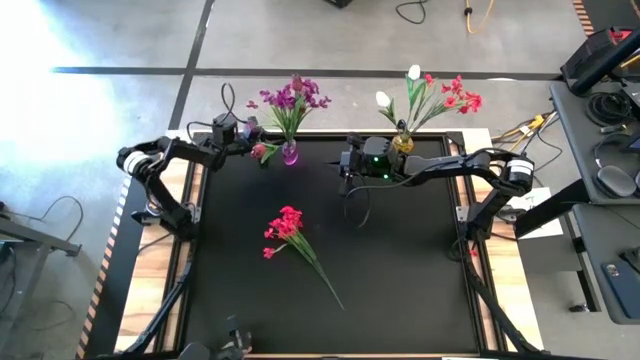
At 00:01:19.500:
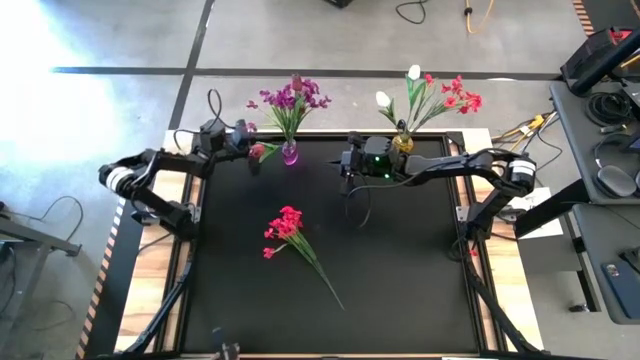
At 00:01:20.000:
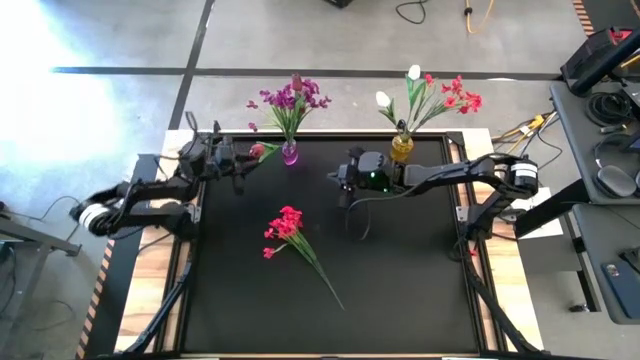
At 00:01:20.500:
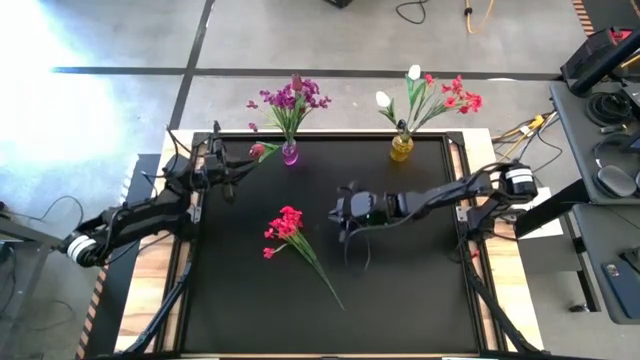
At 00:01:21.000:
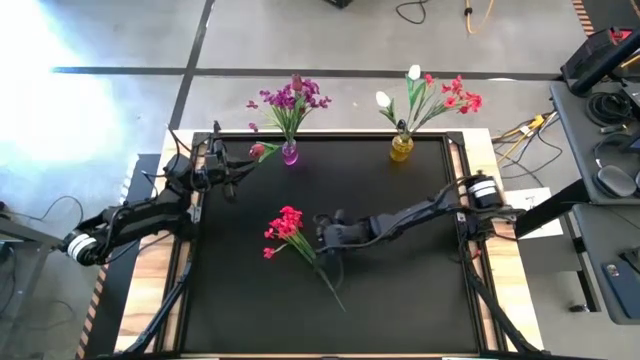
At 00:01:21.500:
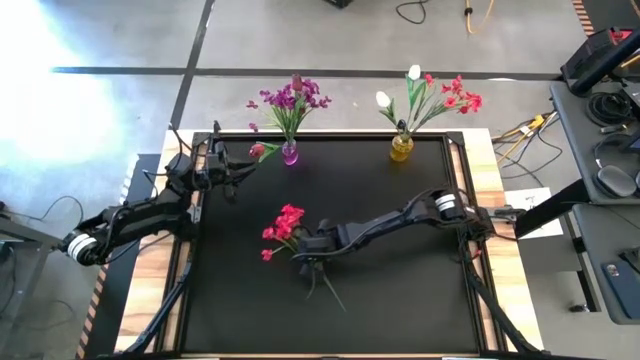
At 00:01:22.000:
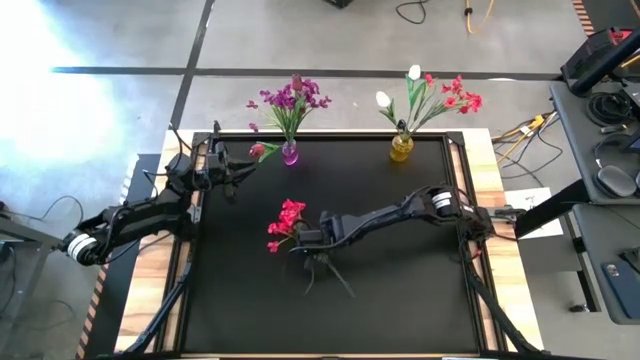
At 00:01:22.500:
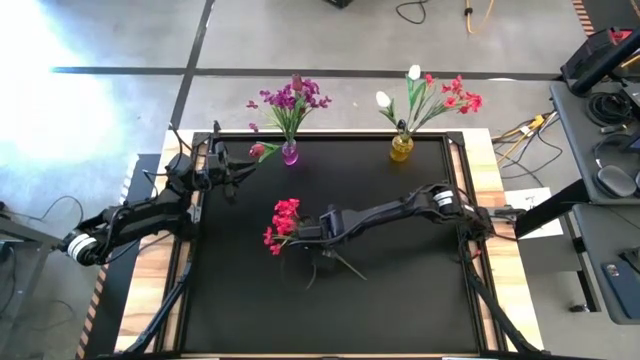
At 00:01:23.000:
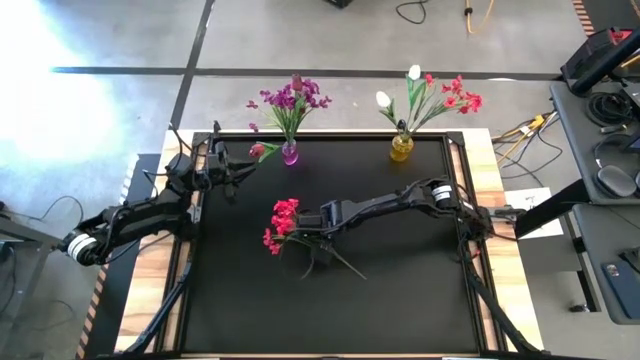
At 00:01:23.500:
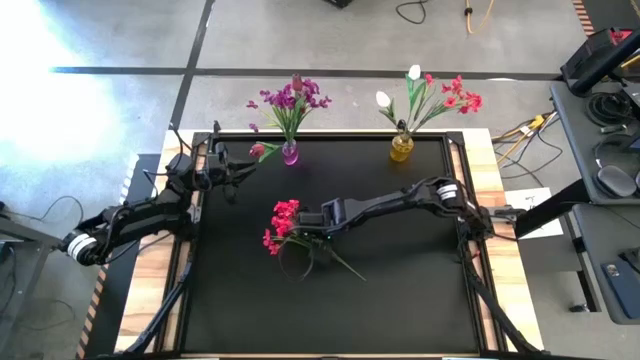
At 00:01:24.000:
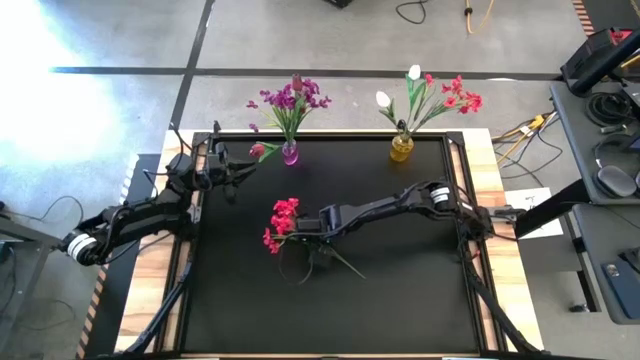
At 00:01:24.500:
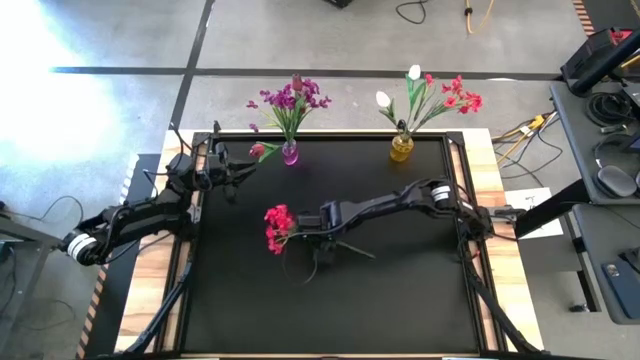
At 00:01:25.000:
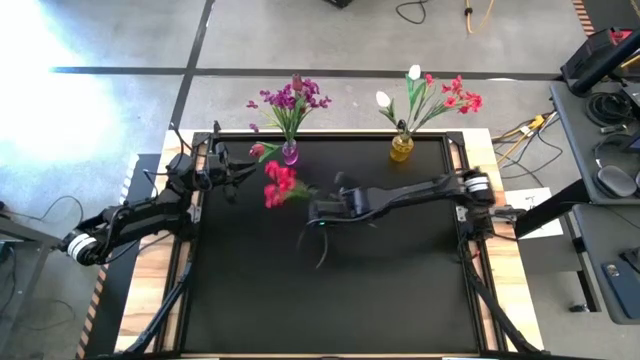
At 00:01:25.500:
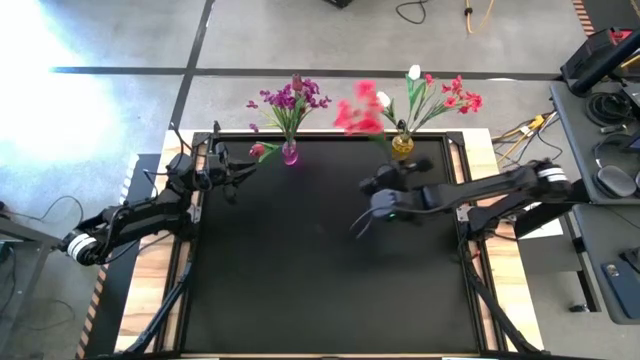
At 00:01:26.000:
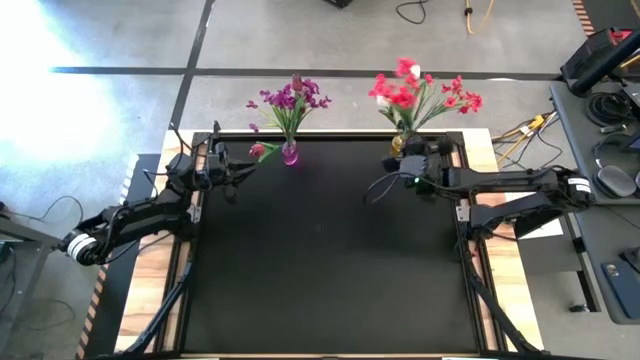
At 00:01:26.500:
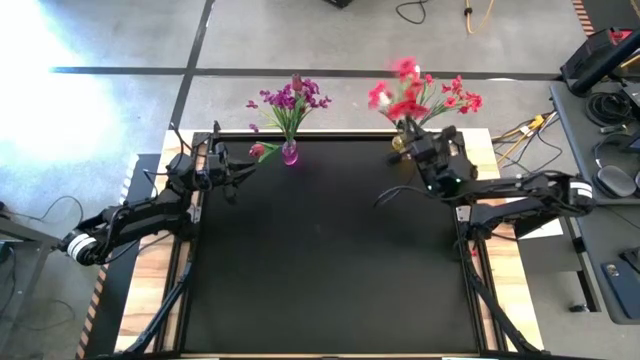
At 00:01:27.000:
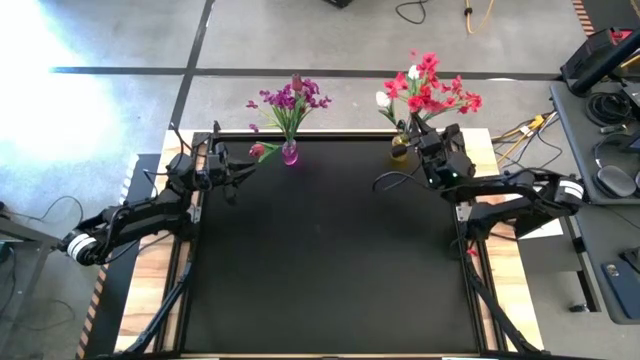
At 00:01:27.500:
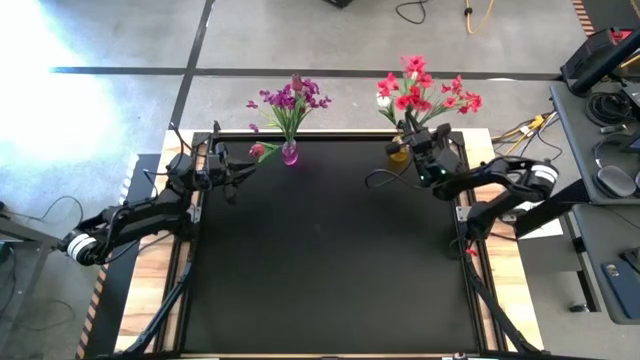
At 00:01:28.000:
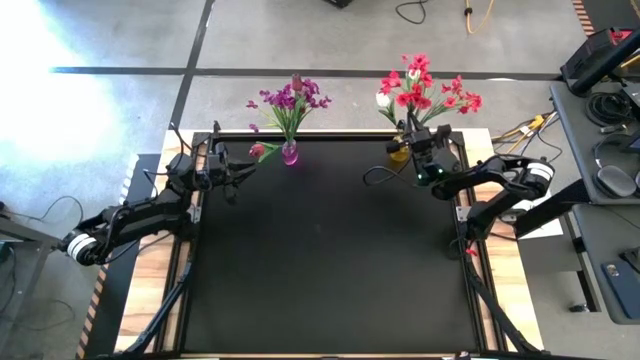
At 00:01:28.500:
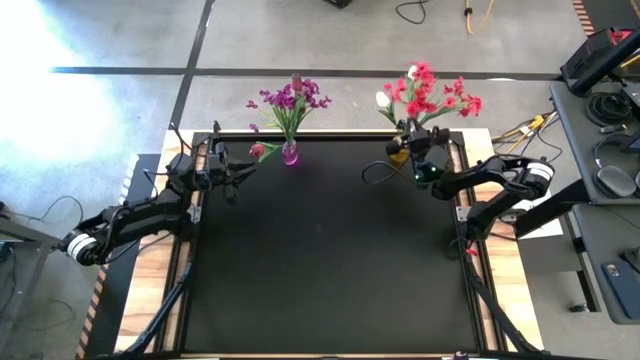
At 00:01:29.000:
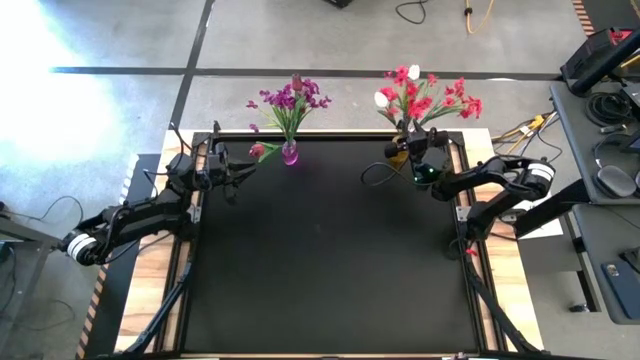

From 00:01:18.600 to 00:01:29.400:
Task: Sort flowers into vase by color
Put the bouquet of red flowers into the yellow vase

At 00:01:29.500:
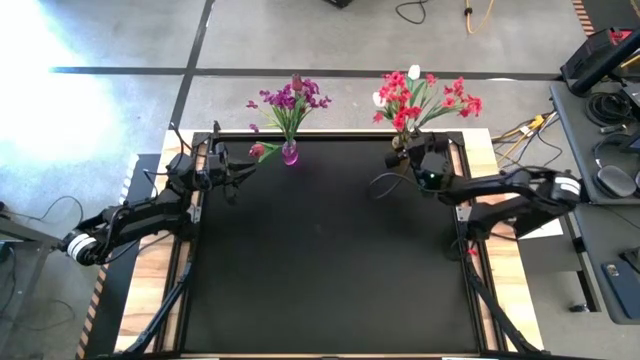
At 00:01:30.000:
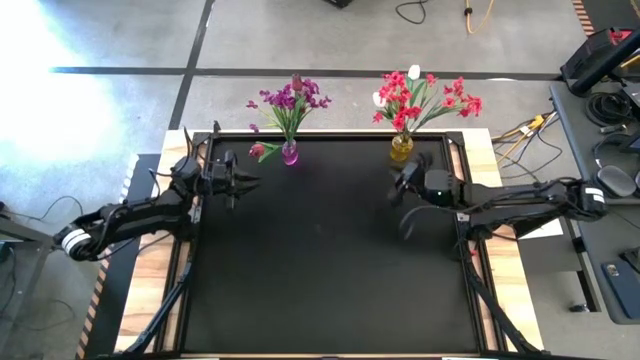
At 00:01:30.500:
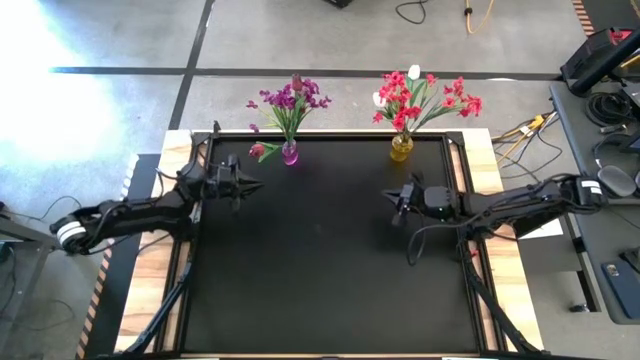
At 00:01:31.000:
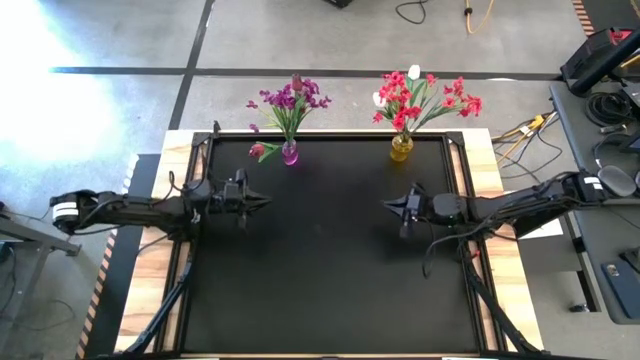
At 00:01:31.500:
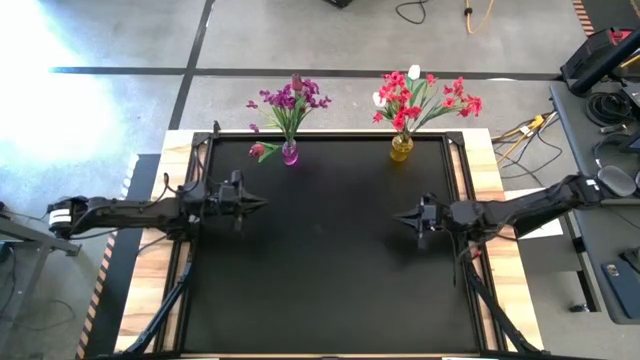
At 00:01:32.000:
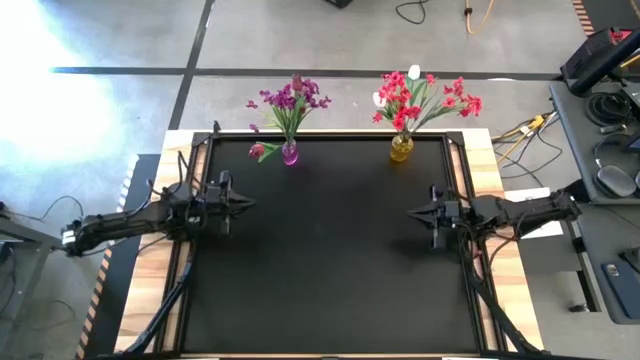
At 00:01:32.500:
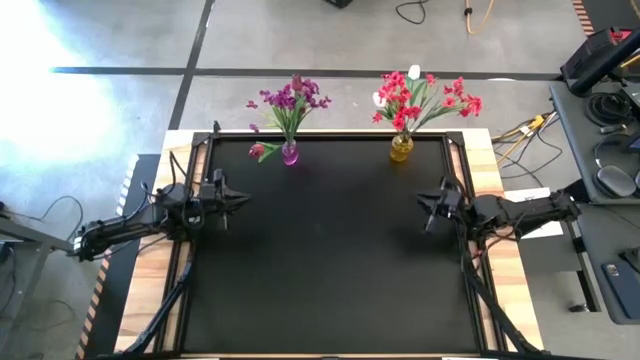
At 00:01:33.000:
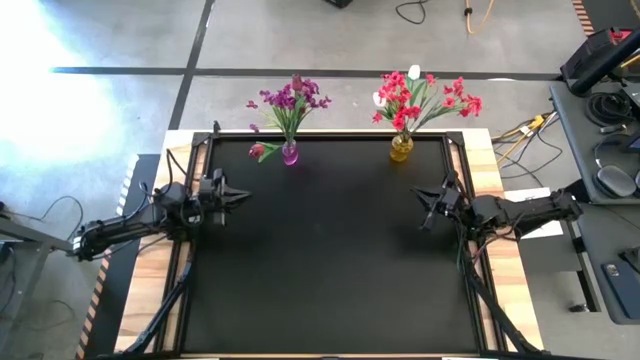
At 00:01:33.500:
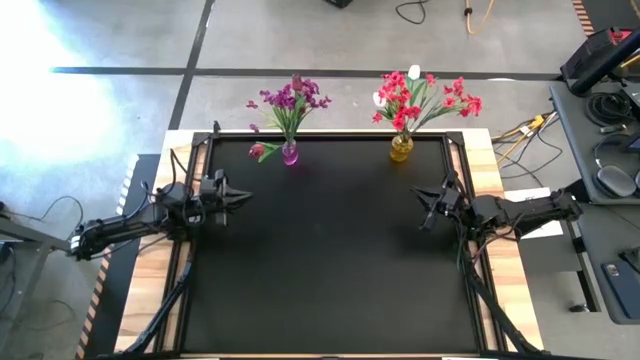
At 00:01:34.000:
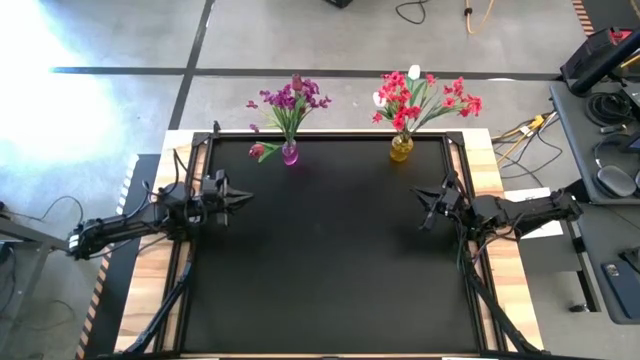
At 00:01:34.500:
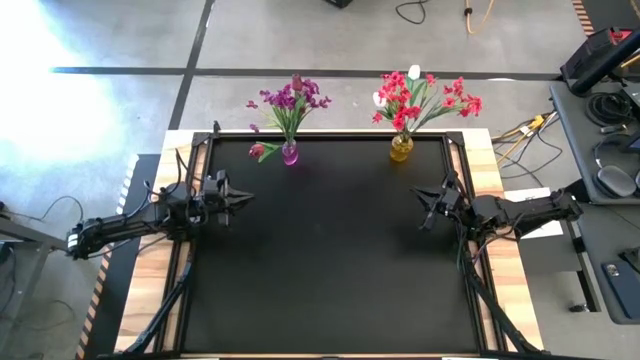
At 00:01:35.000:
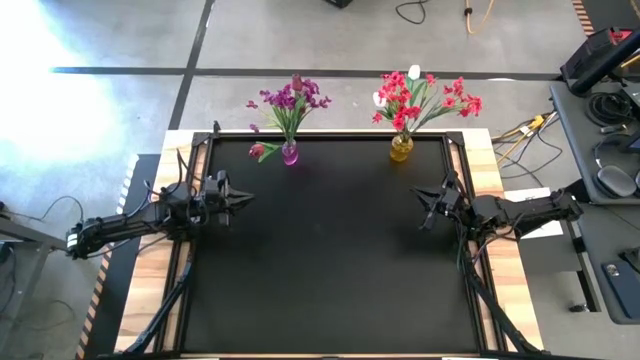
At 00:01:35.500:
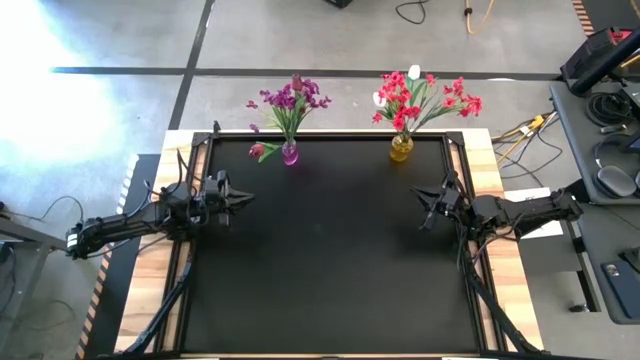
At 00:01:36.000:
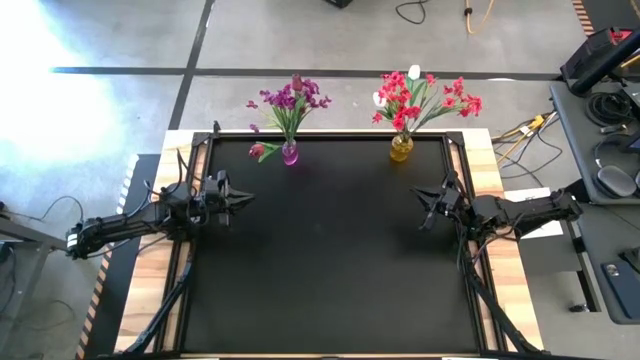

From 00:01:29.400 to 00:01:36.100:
Return to Home Position

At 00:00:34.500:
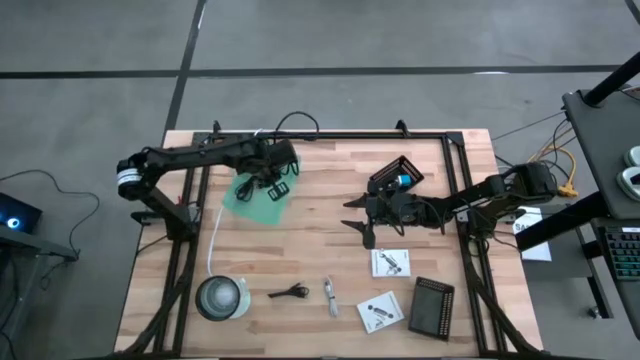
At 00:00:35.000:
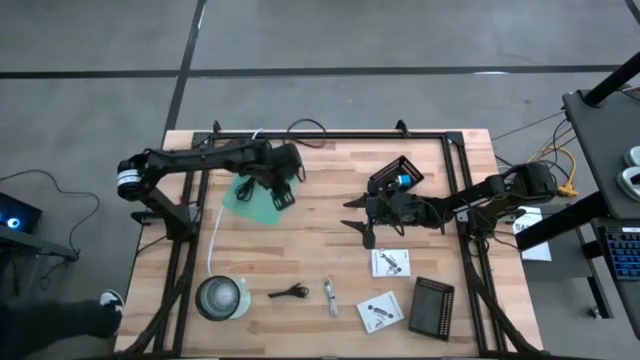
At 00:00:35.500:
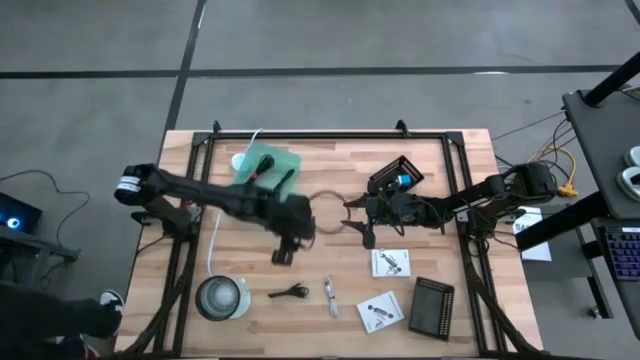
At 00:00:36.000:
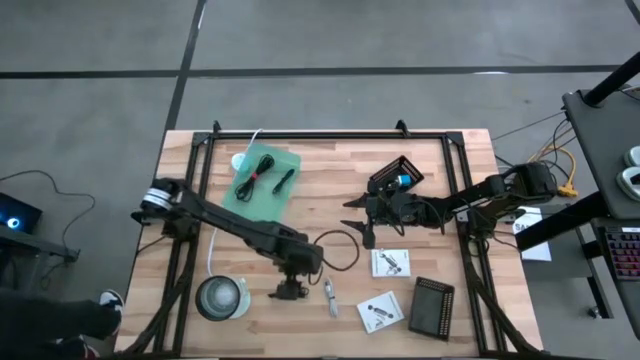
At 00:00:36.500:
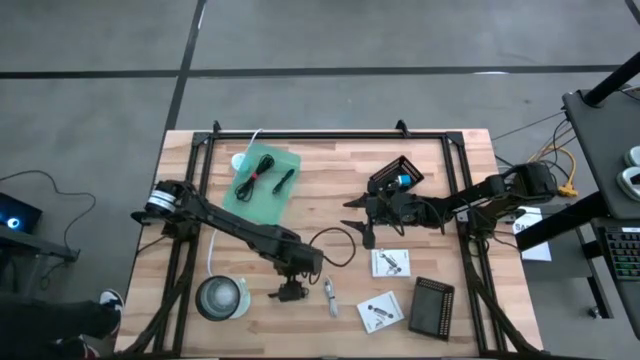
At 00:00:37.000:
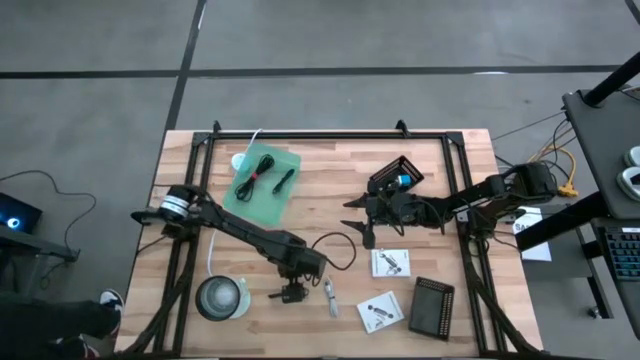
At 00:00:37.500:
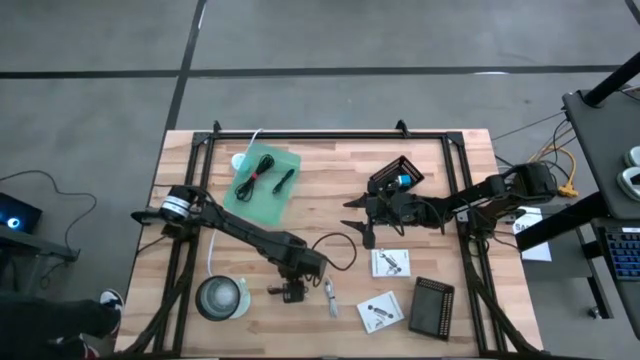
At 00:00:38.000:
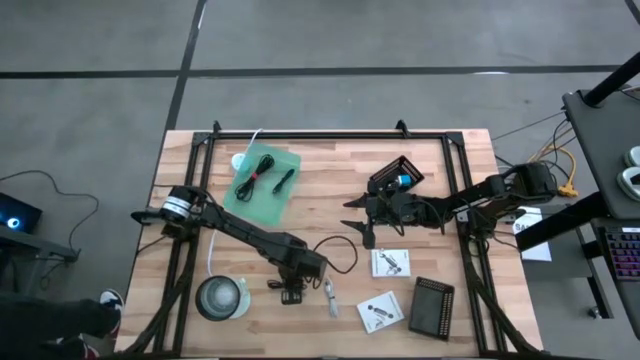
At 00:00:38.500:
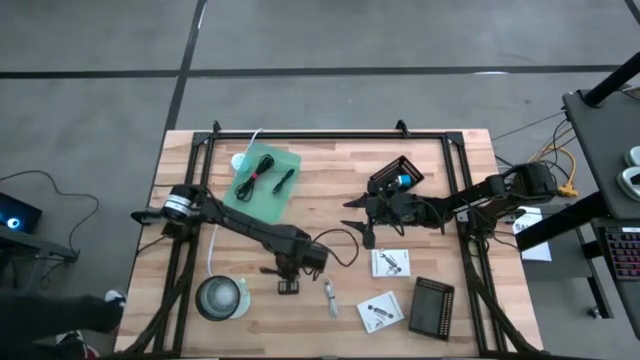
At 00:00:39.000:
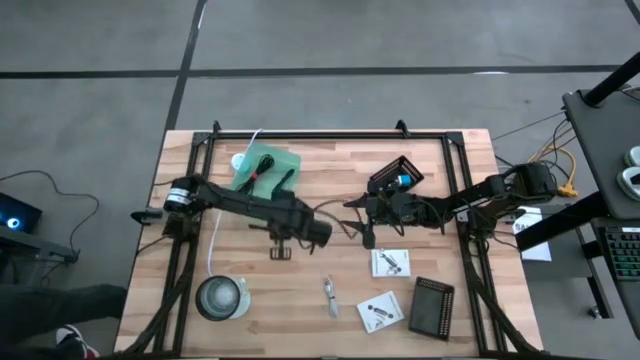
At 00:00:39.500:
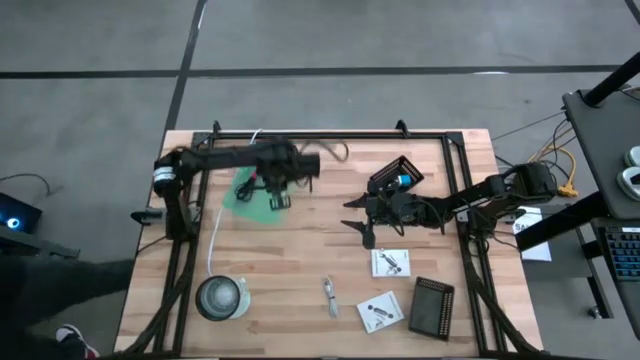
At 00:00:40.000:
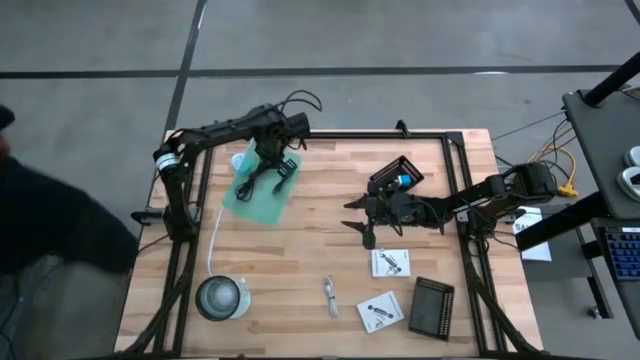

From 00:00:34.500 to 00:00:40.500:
Task: Pick and place items into bin
Put the black charger cable into the light blue bin
